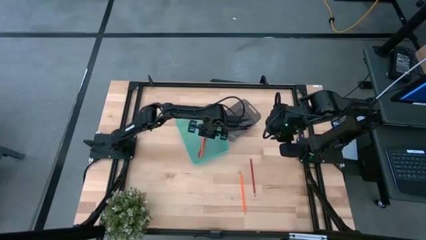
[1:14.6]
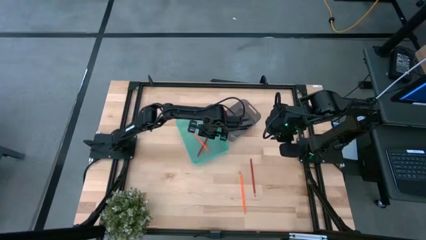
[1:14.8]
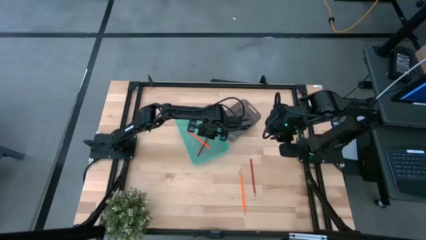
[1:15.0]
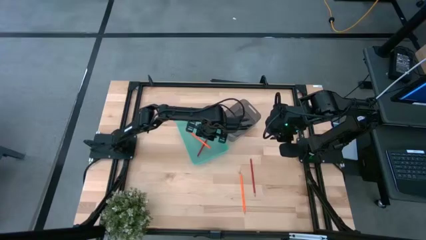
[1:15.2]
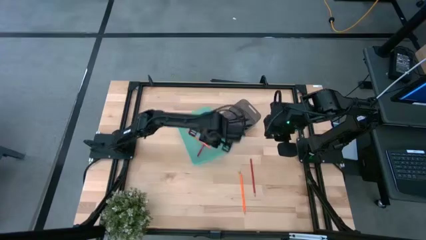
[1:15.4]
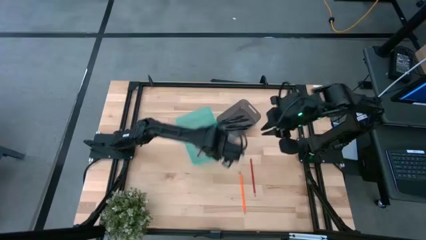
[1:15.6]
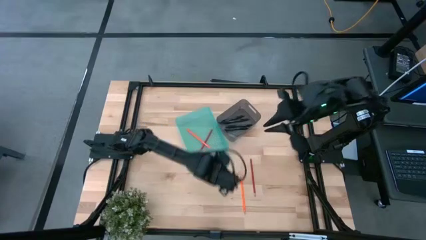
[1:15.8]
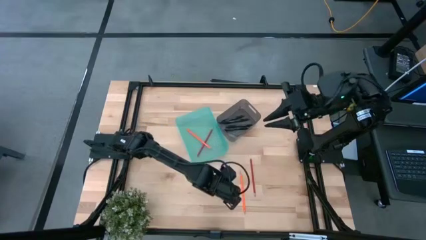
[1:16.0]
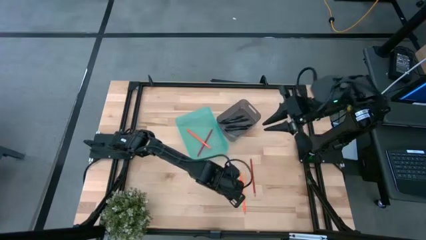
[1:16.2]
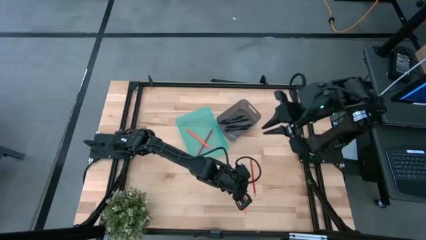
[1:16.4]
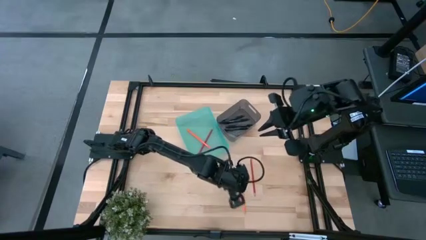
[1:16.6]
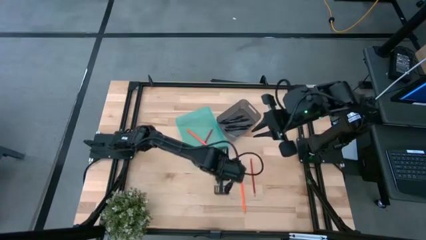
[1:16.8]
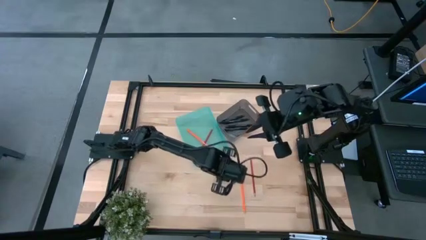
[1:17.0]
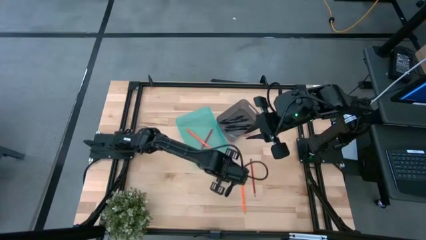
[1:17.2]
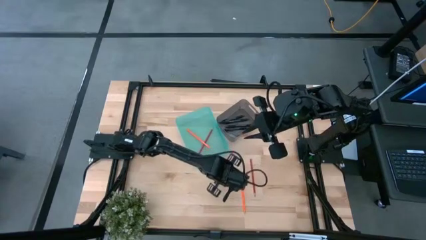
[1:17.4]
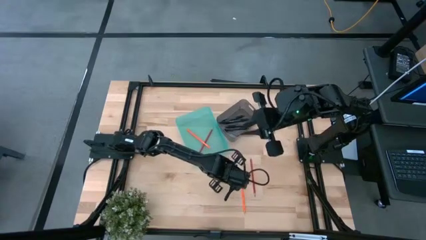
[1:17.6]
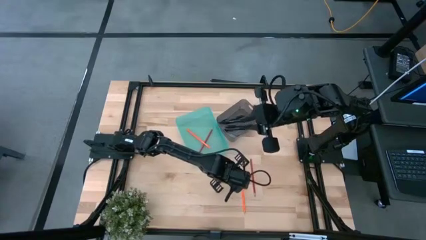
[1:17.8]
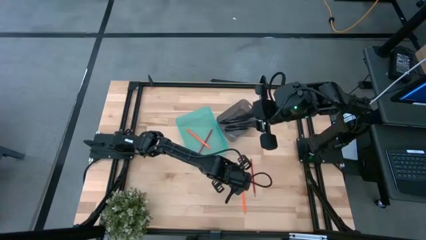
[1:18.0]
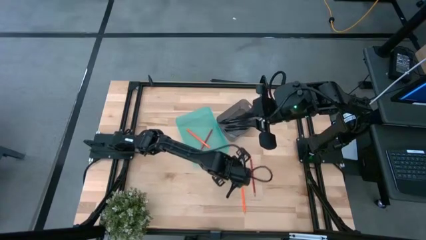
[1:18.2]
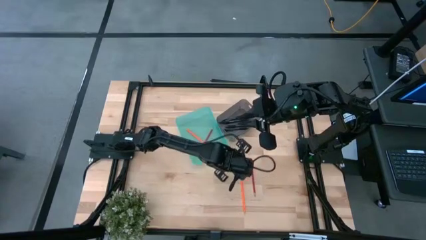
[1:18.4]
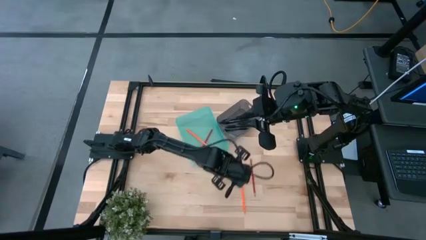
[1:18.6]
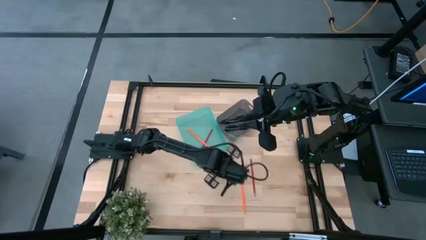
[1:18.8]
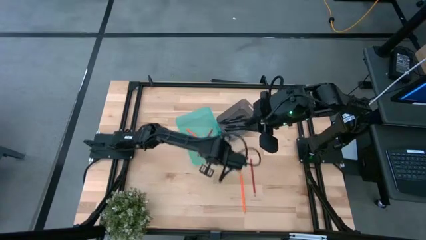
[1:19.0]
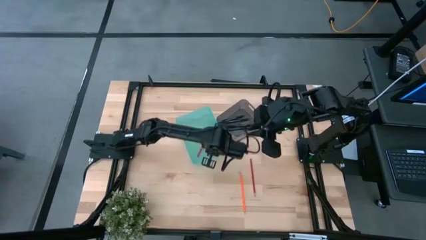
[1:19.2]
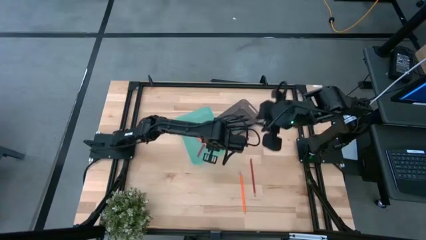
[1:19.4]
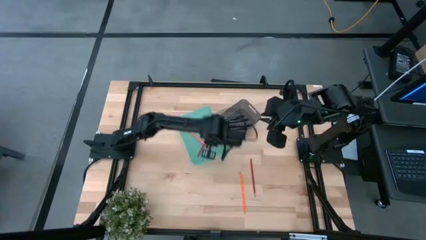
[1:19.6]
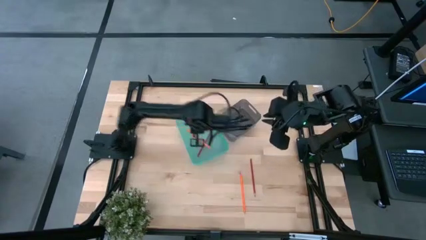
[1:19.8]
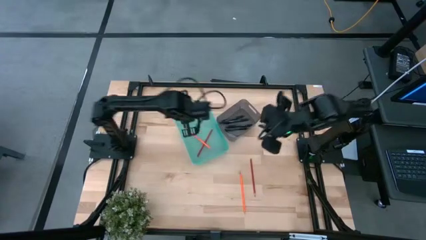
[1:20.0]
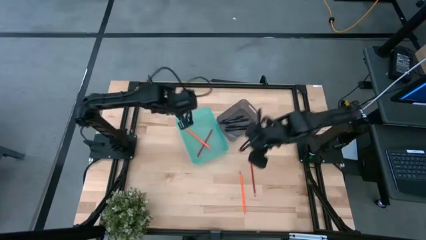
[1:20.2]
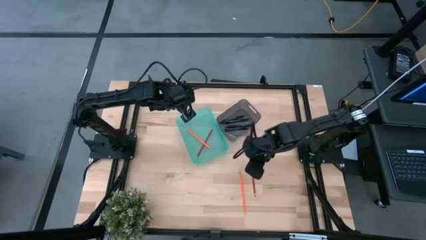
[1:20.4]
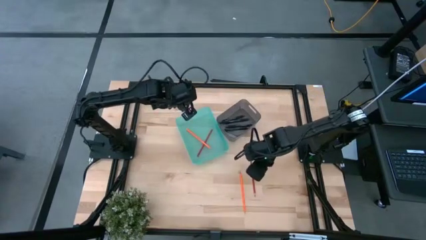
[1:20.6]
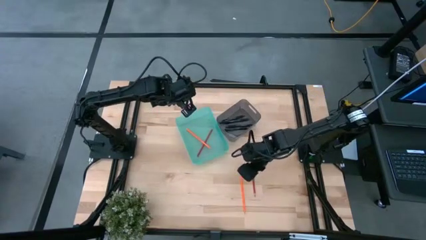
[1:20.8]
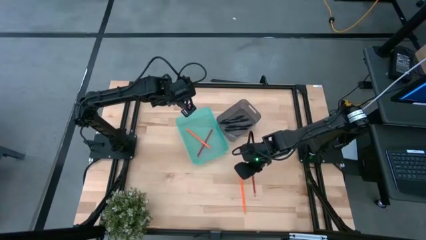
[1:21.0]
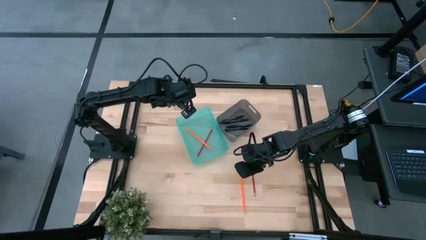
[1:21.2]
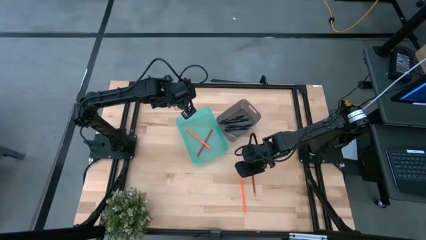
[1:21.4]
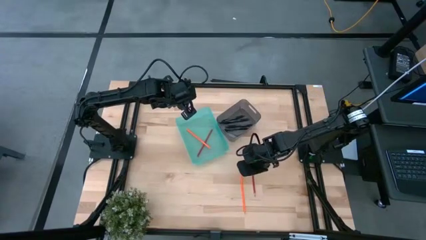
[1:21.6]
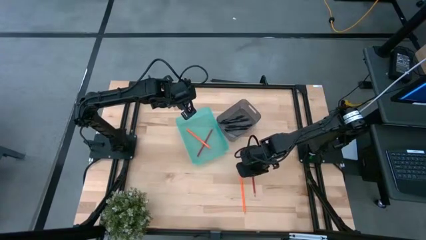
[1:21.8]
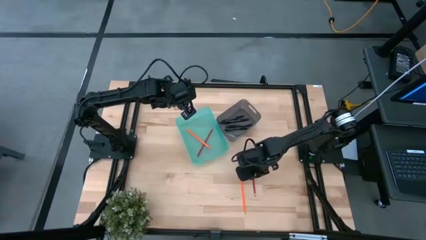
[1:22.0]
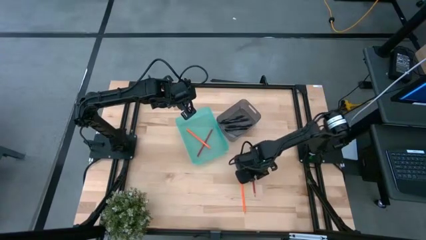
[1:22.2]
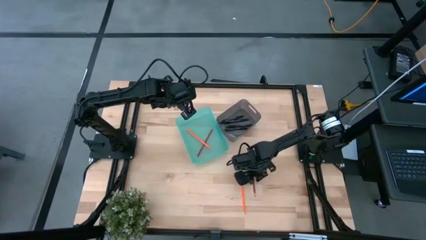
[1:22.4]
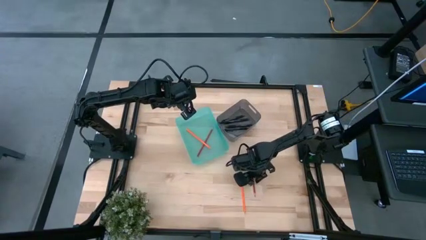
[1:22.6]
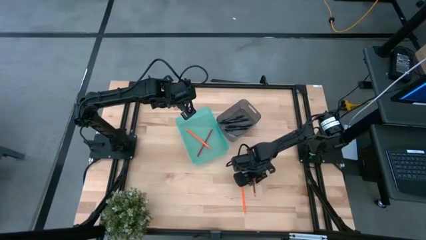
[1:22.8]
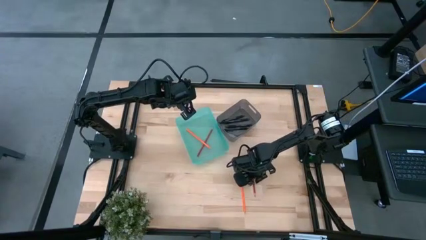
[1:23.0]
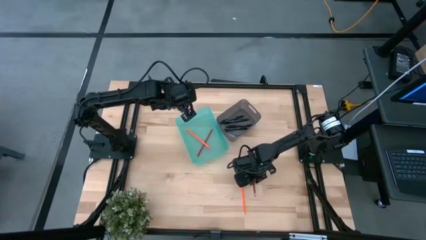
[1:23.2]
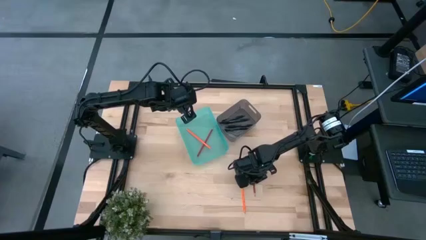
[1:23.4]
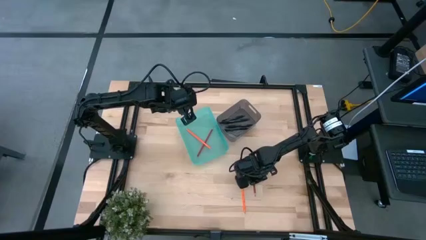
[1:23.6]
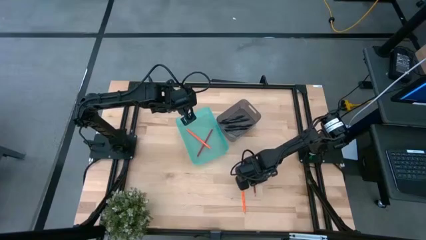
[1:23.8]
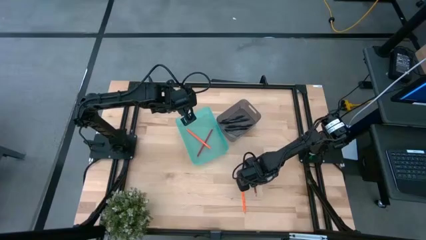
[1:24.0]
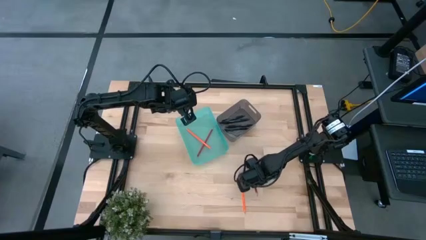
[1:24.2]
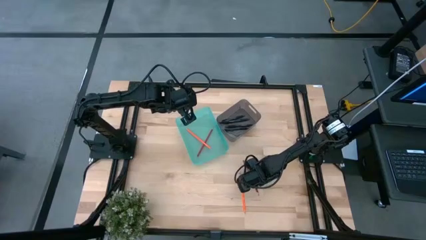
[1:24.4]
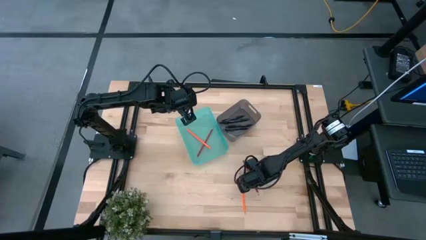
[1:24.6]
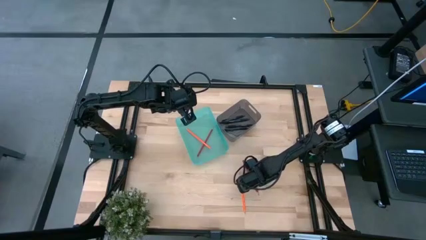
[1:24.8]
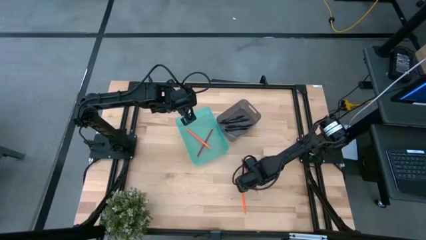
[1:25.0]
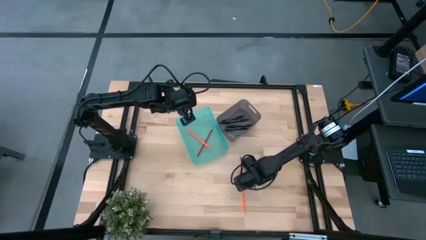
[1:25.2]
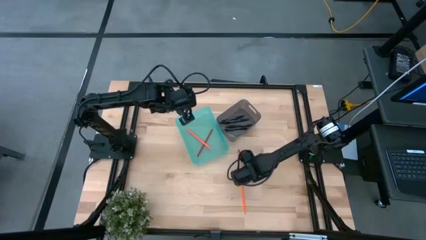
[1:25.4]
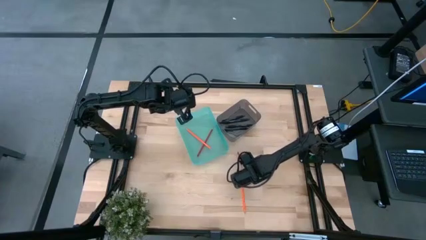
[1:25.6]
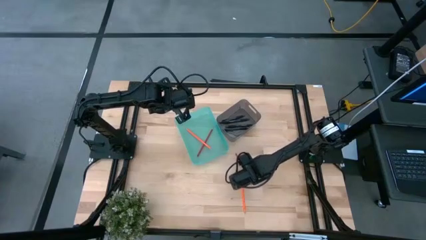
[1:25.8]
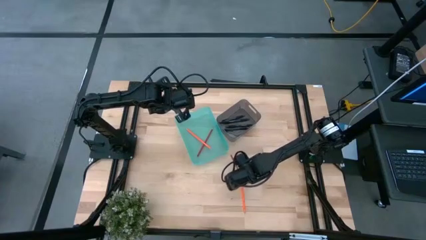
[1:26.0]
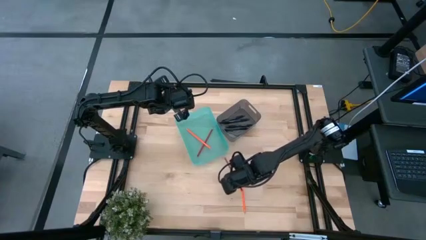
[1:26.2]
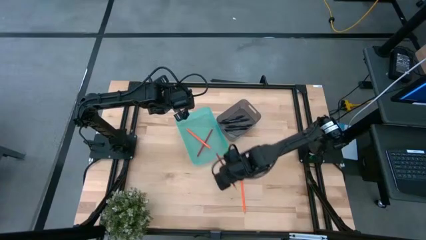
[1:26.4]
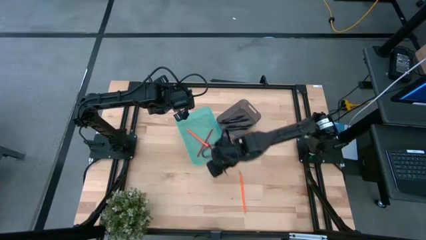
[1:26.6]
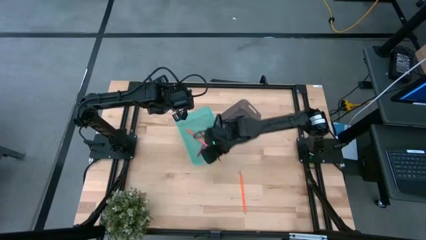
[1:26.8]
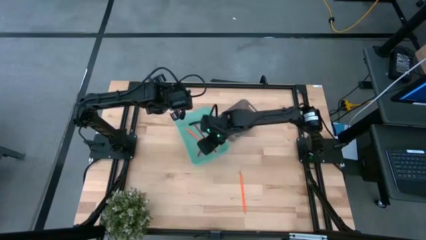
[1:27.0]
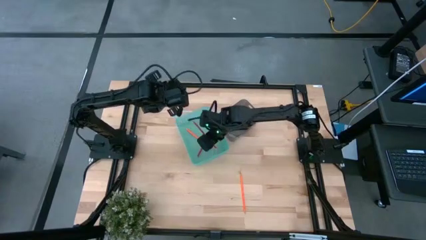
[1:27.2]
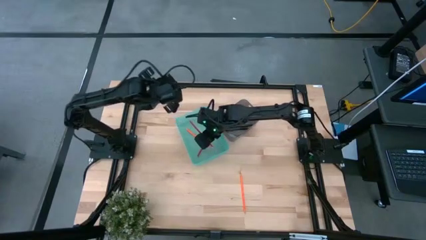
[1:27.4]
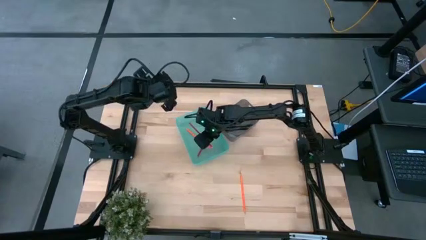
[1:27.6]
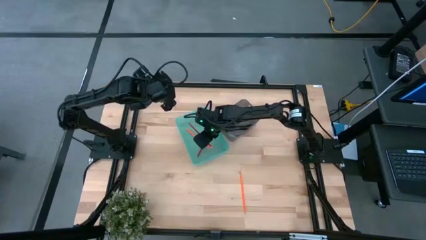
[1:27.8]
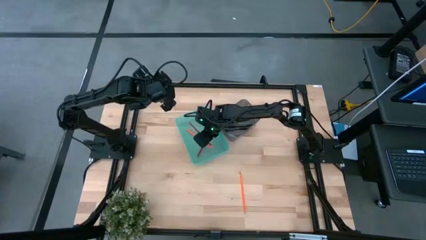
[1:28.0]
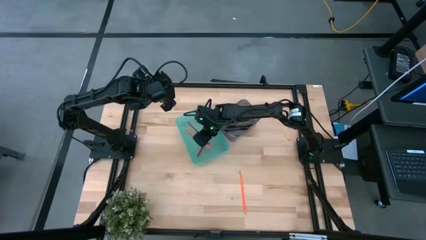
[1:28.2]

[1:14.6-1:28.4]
Task: Sort pens & pencils
Put the red pencil into the light blue bin

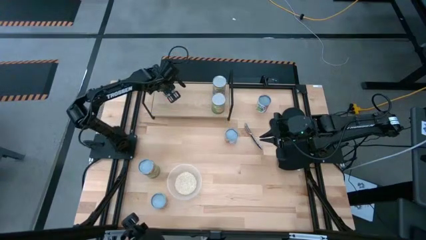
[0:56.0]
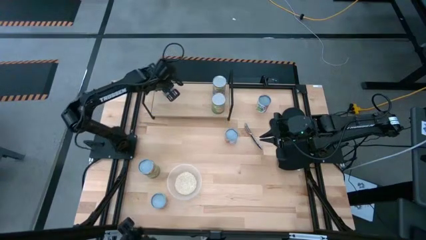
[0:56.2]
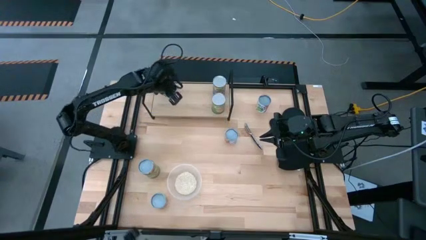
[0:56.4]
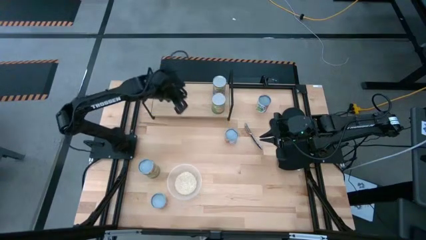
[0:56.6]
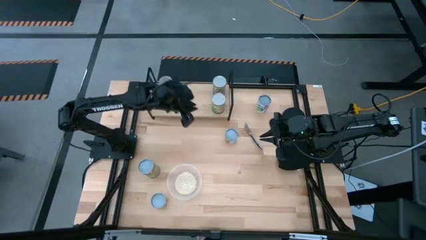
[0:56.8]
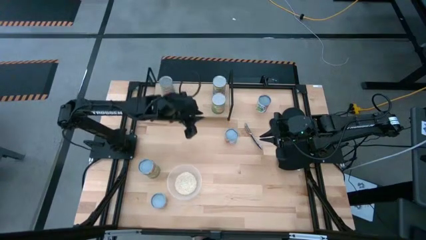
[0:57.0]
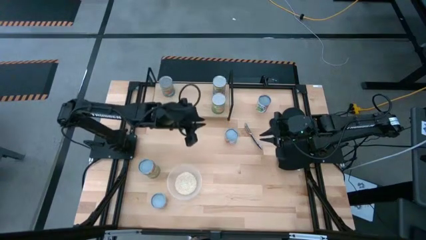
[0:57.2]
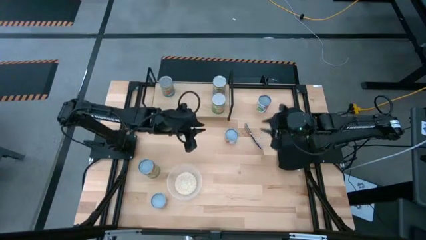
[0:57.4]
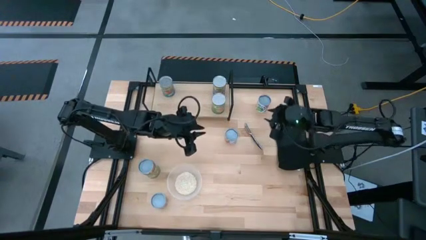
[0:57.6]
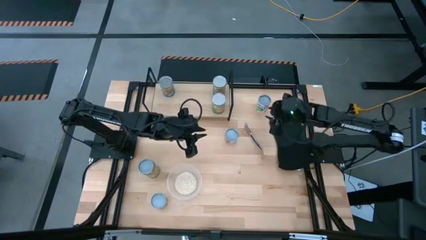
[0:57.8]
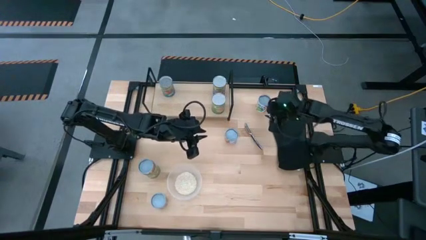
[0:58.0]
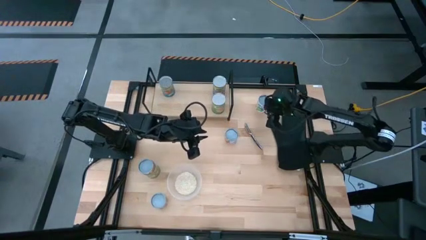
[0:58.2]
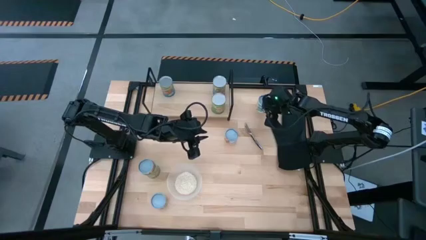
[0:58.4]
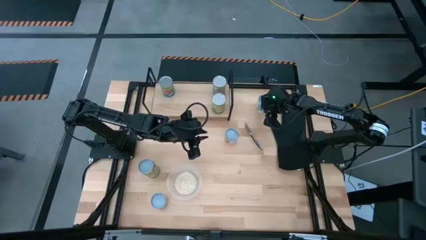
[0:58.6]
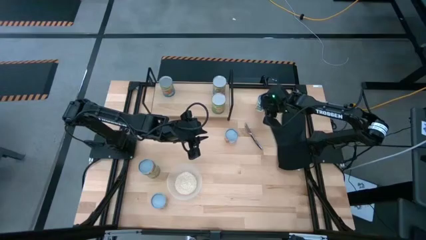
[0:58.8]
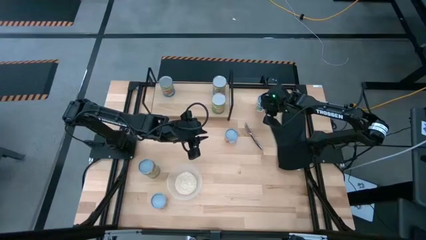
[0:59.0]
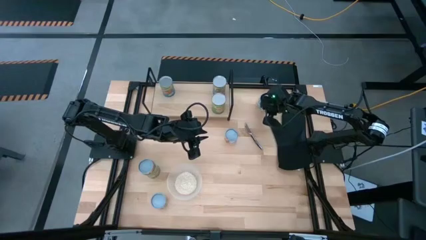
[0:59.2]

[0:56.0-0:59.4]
Task: Pick and place cans onto a shelf
Move the canned mixed fruits to the center of the table
